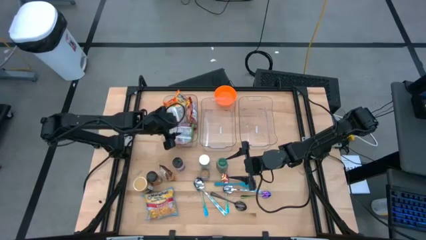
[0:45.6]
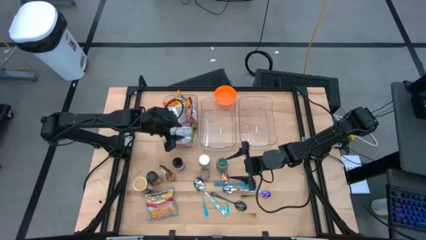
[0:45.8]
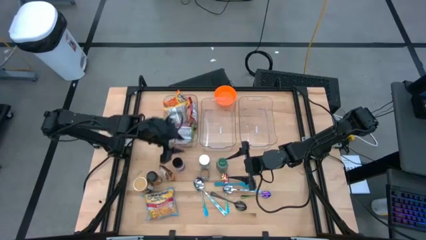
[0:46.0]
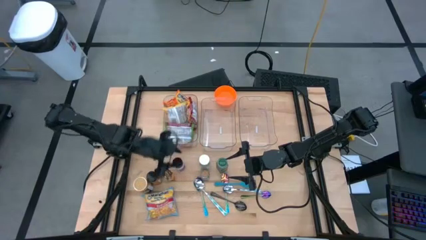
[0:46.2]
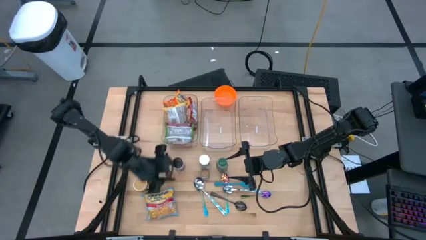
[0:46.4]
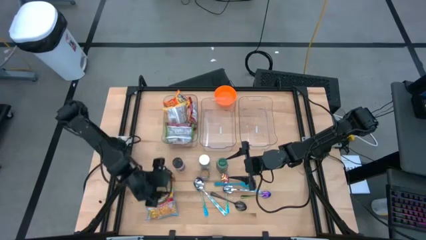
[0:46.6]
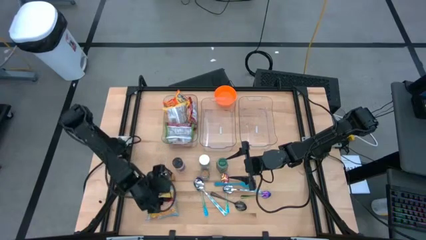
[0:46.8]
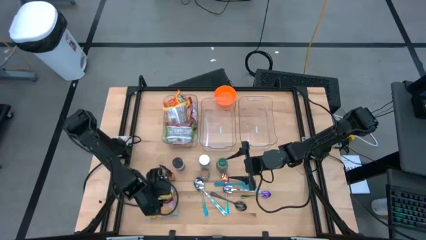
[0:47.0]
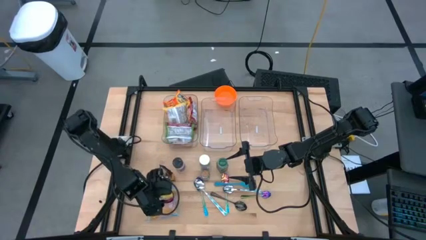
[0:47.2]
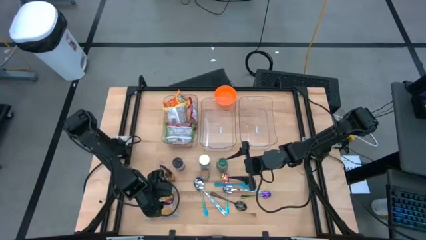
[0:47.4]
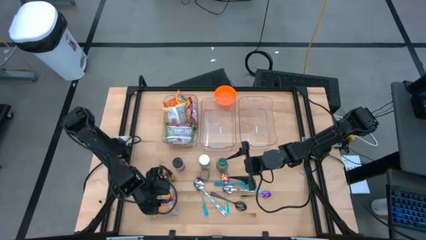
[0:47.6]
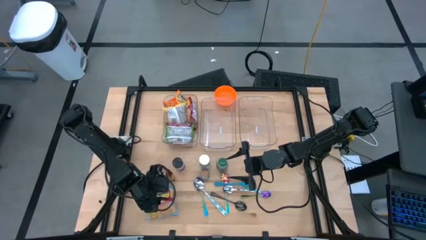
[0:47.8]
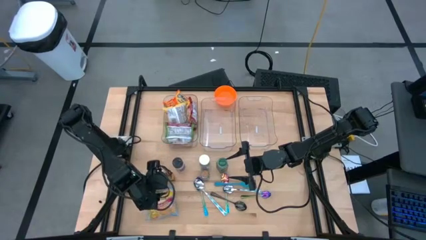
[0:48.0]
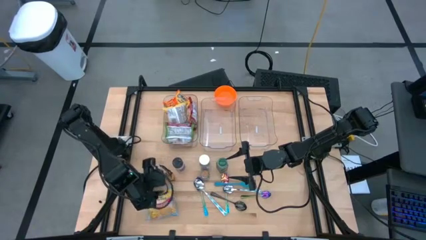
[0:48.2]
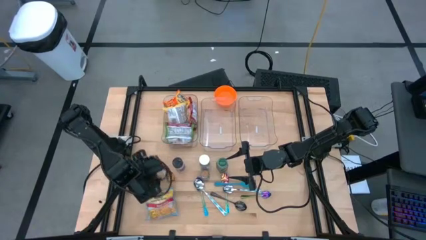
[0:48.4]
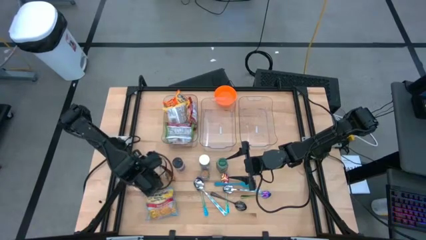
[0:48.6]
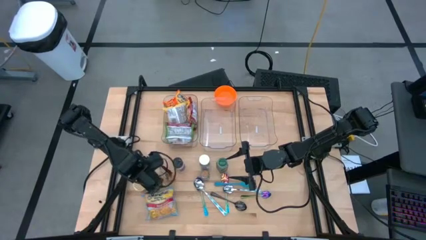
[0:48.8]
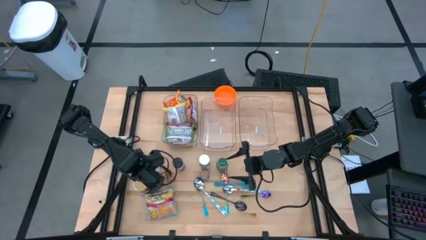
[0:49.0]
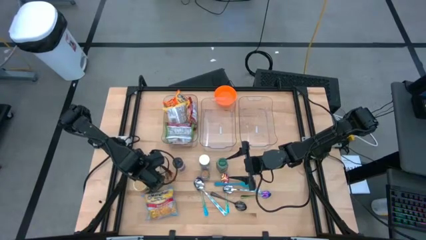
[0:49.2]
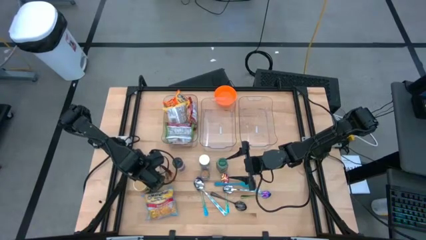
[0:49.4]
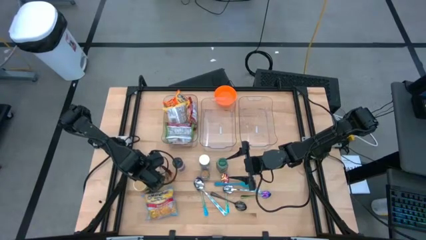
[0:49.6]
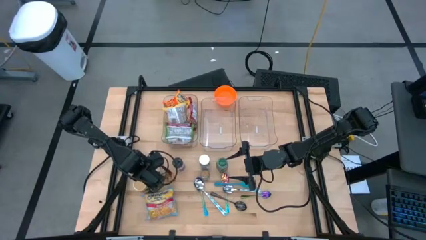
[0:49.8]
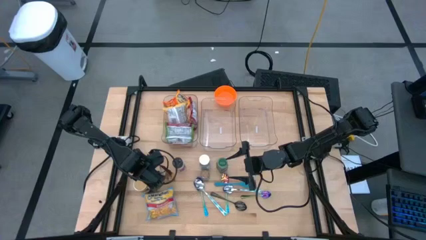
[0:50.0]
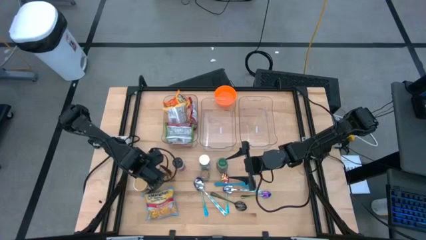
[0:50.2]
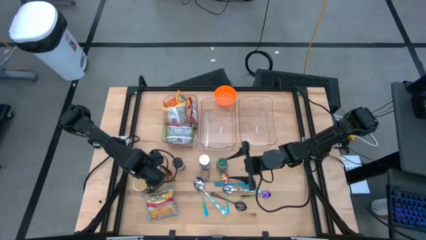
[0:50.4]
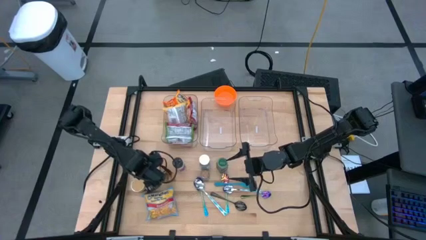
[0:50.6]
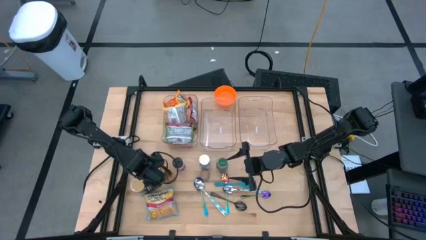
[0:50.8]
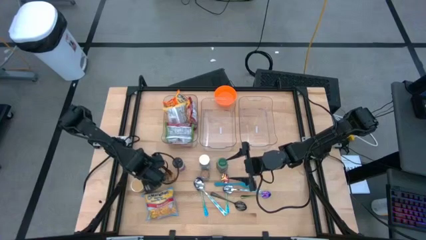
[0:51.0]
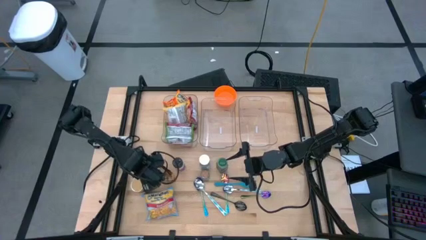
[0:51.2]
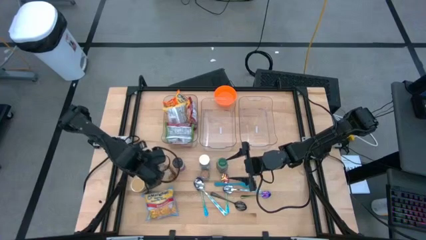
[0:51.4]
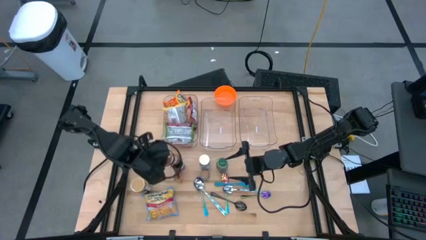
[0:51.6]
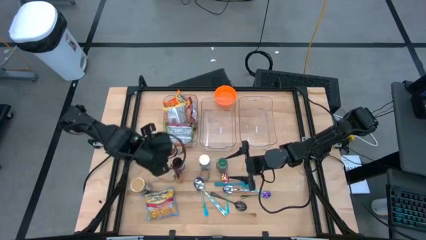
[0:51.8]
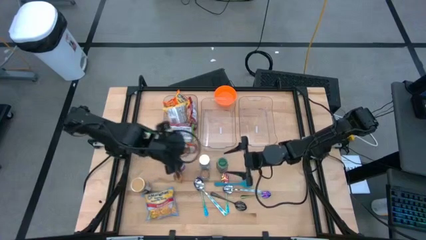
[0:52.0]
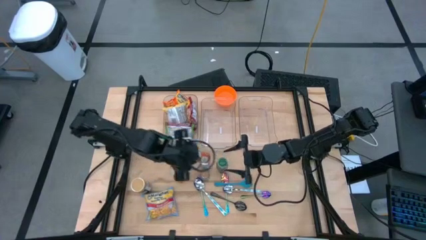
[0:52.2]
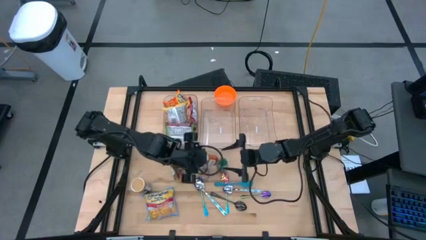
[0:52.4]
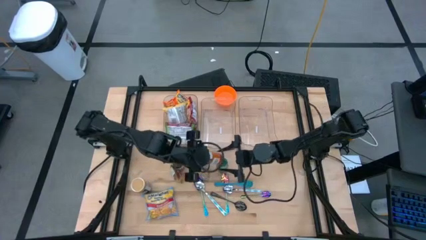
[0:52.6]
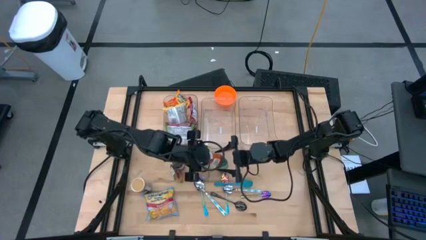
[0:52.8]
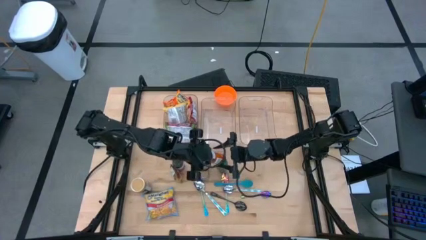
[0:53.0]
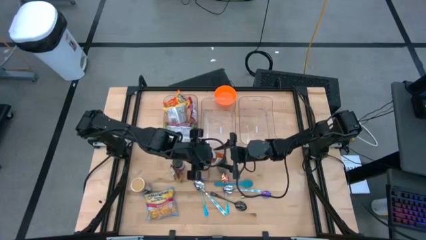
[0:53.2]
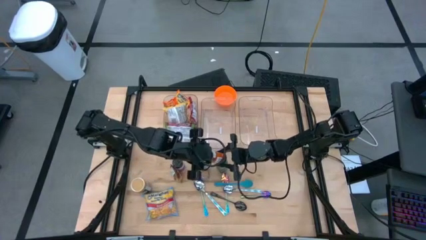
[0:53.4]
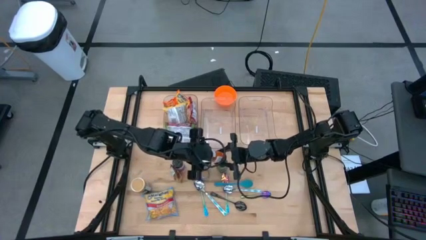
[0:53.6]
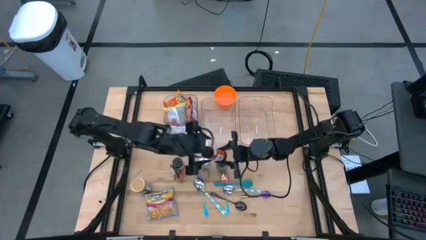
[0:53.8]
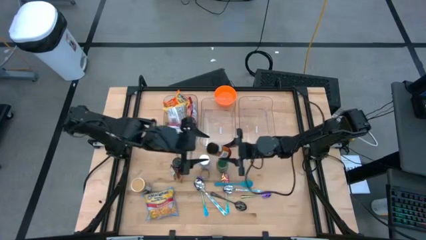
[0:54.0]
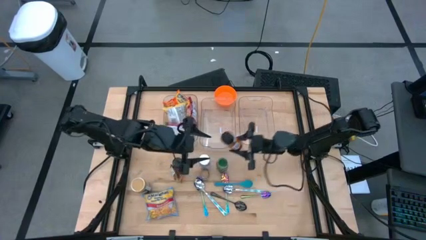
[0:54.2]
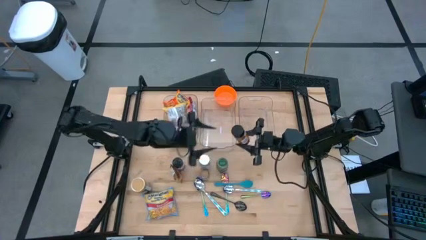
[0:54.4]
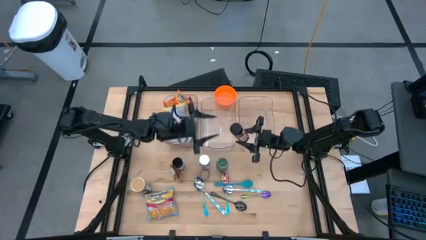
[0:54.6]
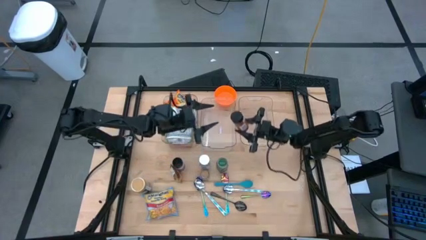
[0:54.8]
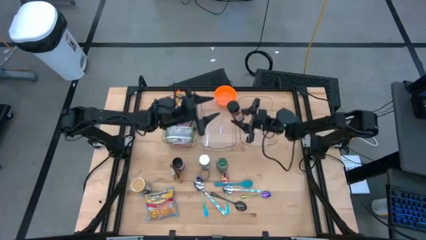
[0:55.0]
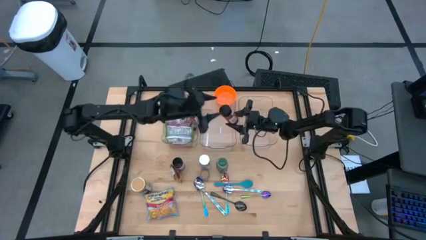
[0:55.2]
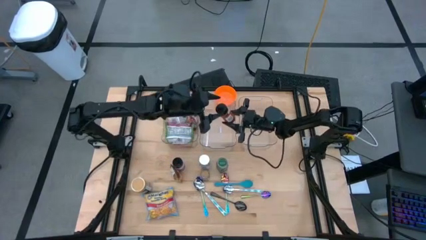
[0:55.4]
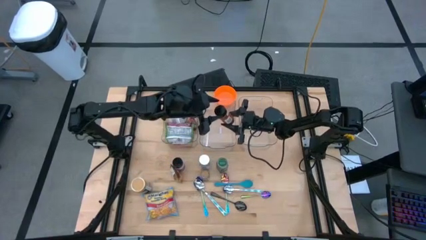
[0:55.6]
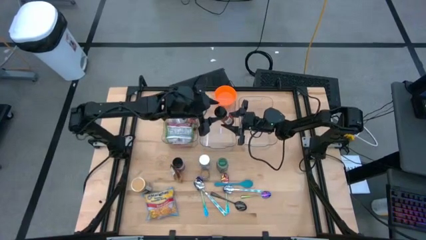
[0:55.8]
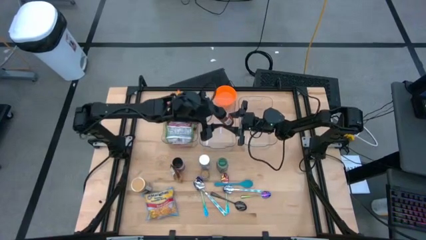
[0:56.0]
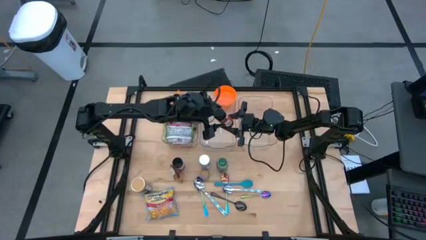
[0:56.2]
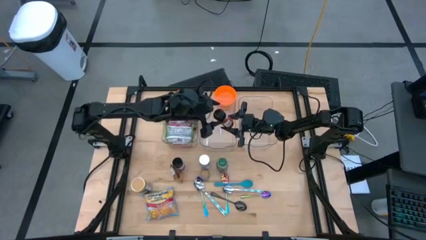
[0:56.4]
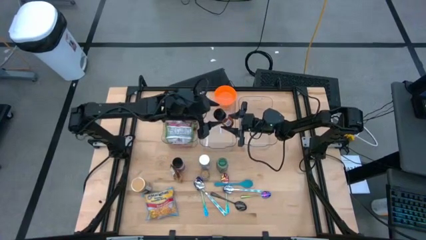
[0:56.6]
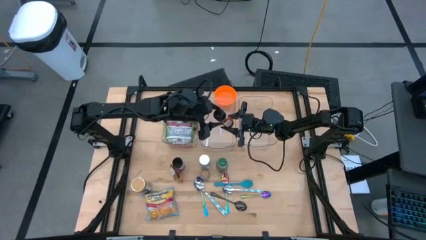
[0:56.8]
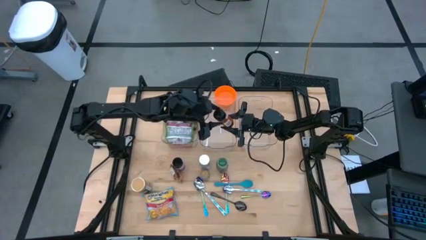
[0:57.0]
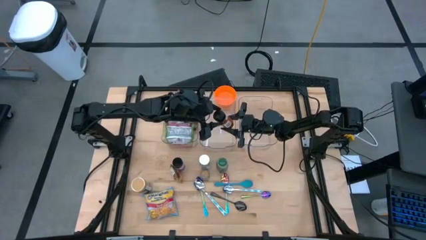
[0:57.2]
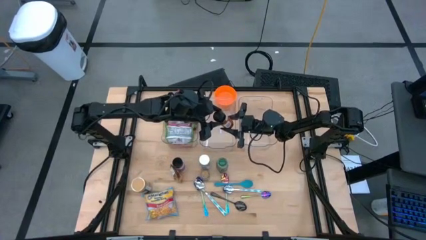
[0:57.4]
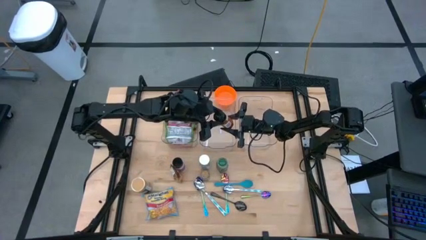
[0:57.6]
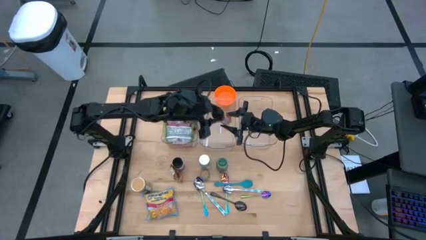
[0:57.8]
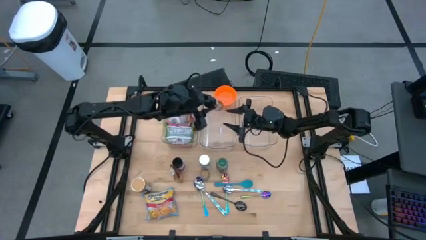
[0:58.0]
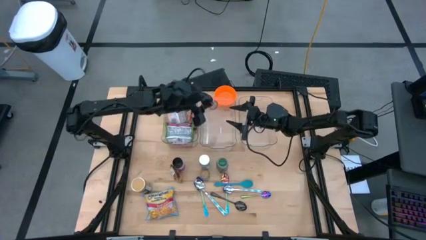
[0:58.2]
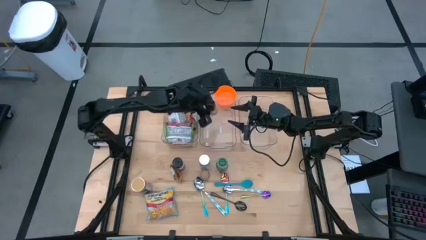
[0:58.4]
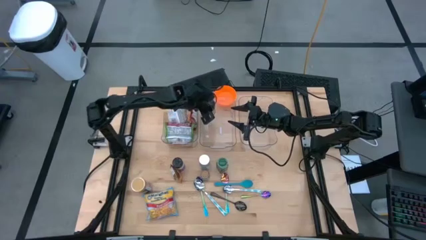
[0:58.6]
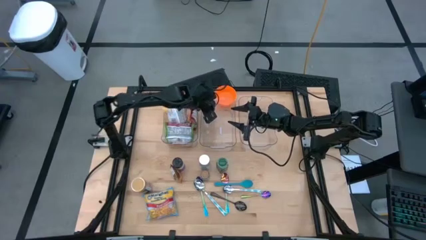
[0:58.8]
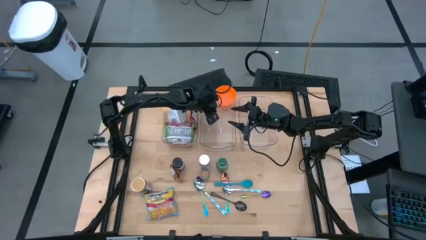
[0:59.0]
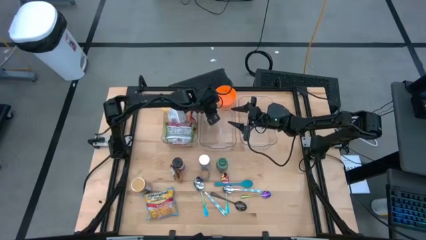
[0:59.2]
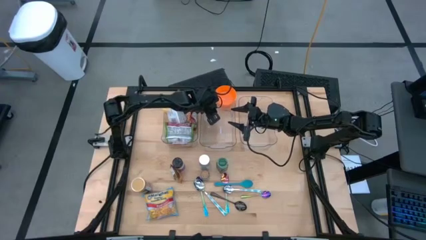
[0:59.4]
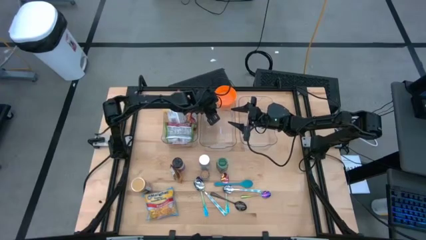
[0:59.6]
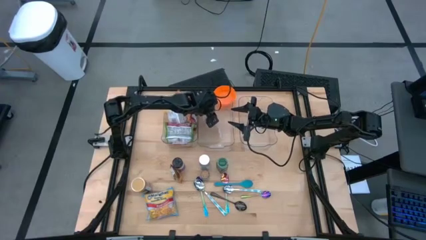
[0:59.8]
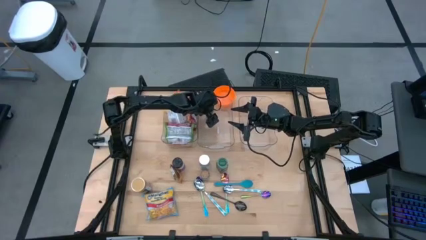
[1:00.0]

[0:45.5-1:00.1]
Task: Pick & Place Food Item
Put the left black seasoning bottle into the middle transparent bin

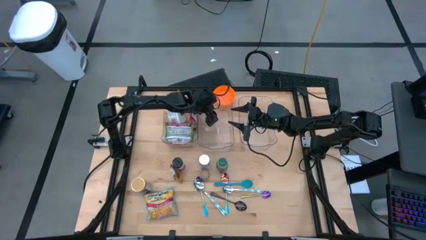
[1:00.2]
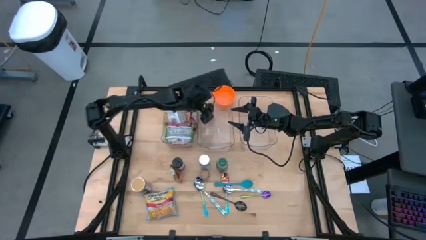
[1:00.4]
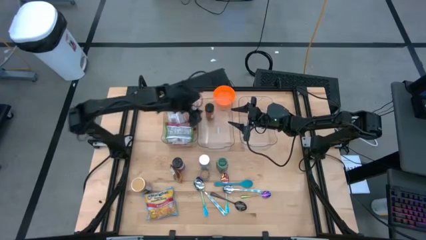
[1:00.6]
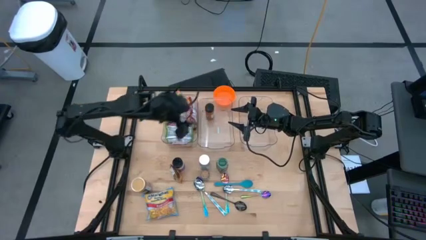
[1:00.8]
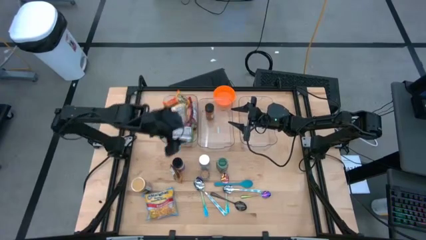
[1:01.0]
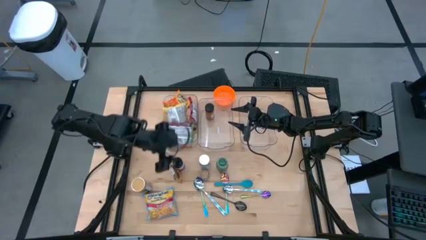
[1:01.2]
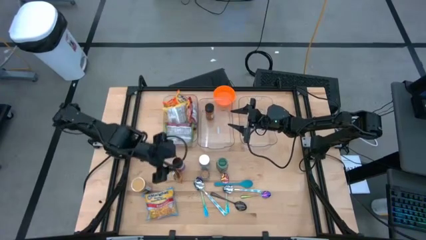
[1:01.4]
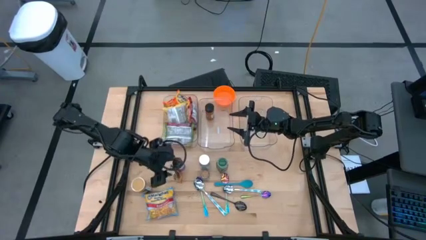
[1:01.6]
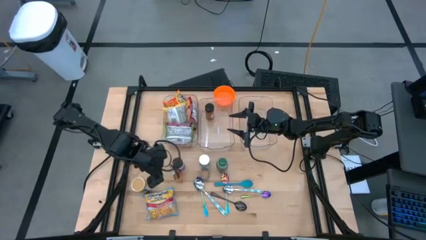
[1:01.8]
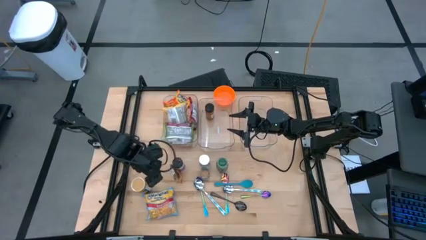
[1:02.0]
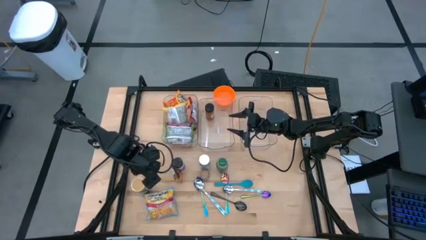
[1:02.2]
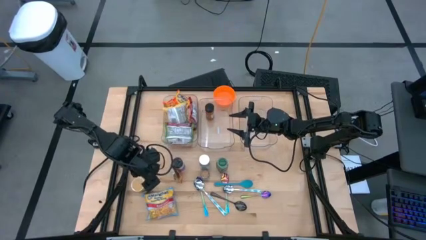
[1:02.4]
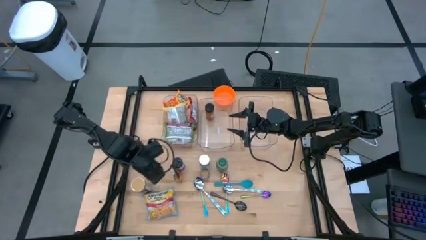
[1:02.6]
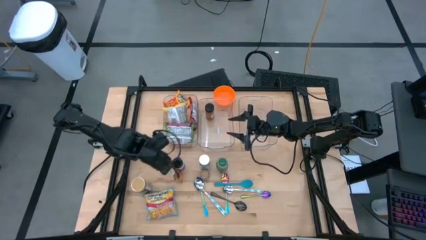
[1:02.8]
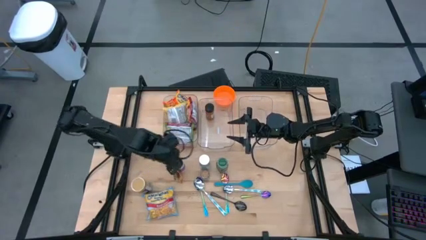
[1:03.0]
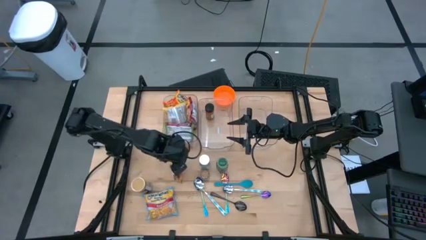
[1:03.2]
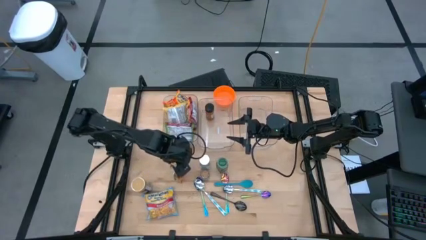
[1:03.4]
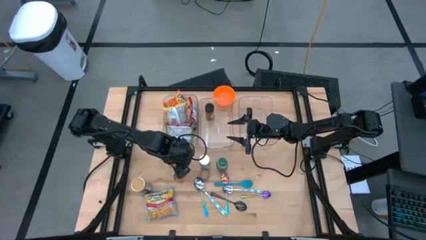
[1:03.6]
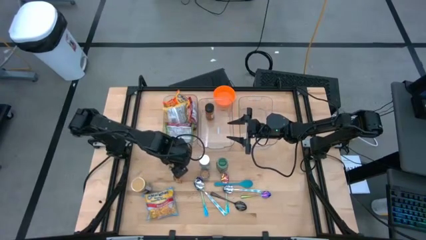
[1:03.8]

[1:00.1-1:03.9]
Put the black seasoning bottle into the middle transparent bin
